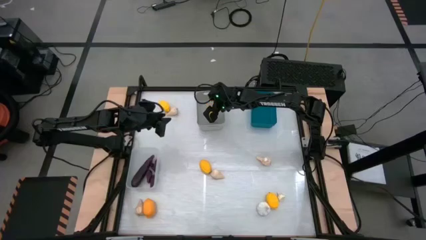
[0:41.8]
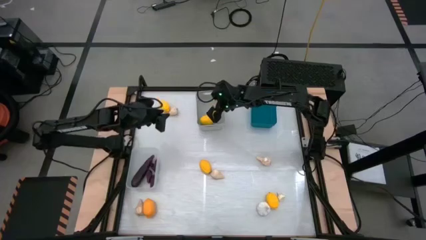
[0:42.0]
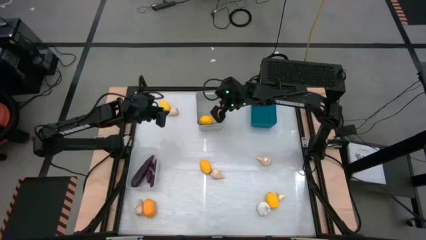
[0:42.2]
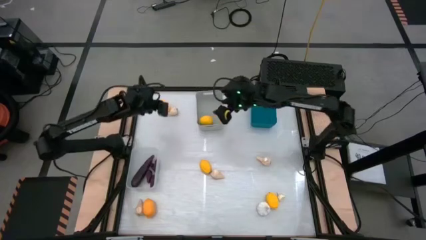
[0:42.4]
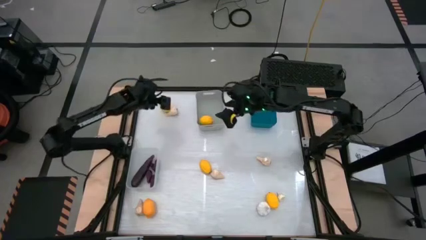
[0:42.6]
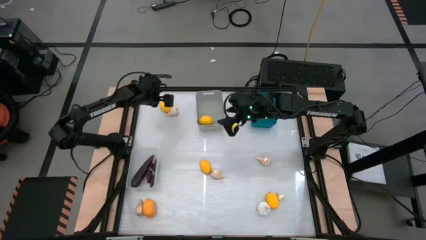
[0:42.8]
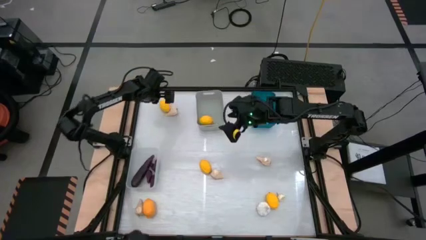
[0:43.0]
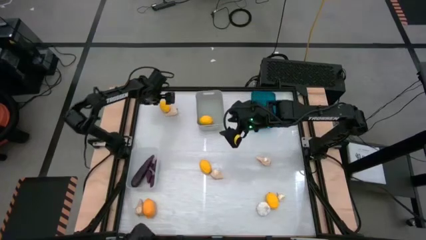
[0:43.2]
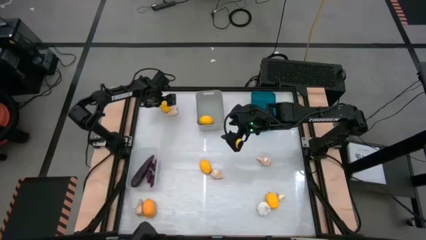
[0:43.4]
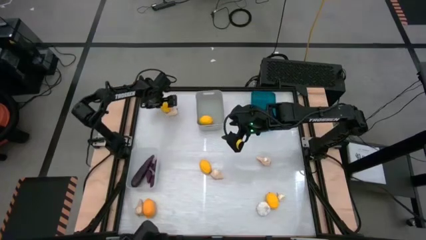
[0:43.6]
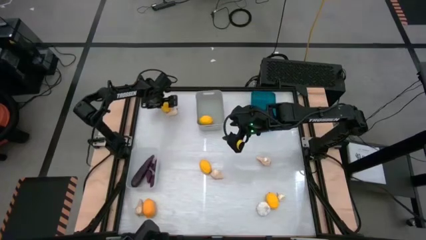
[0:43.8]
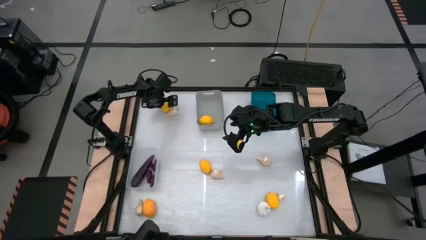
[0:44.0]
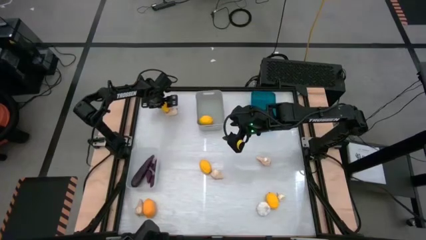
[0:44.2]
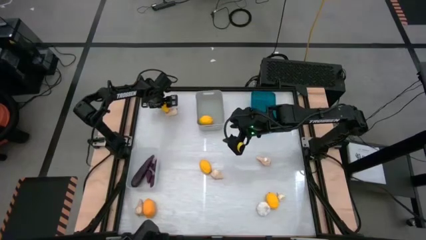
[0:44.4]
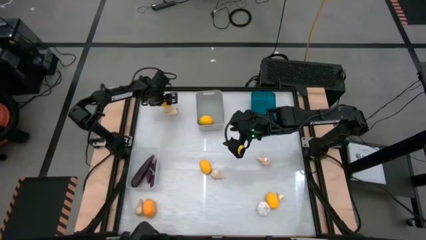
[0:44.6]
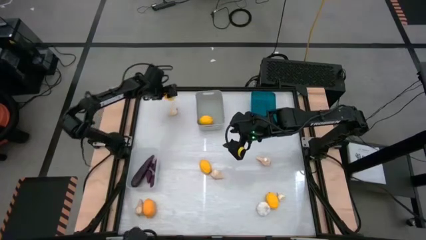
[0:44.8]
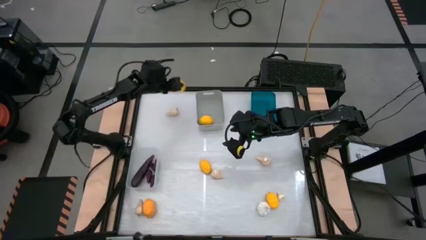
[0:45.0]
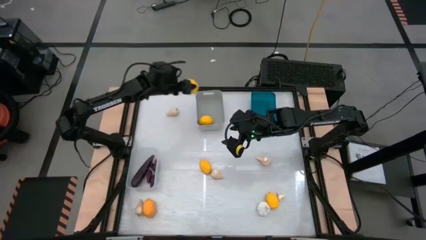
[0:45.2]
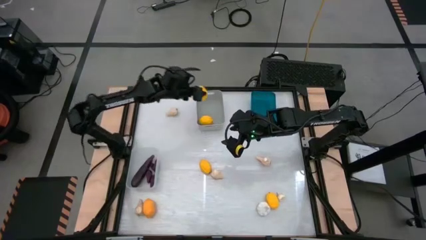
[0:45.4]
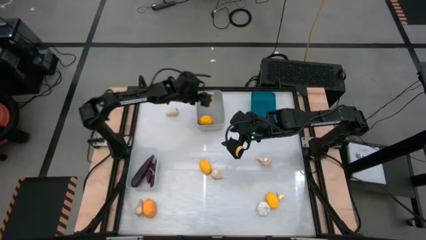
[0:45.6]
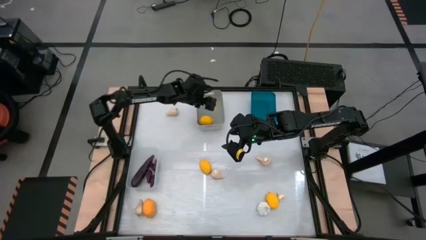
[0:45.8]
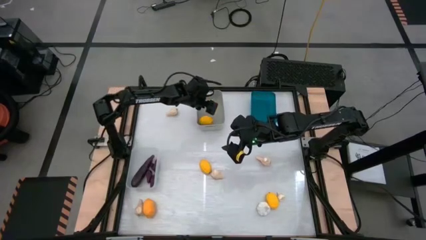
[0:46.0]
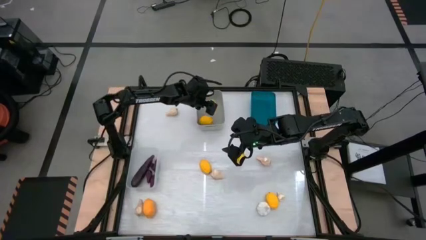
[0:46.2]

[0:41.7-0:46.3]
Task: Sort produce into baskets
Put the yellow lemon into the gray bin

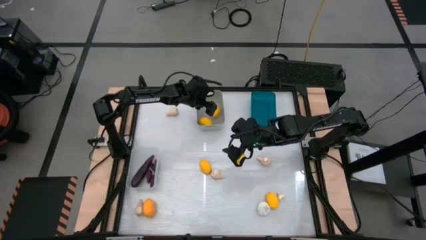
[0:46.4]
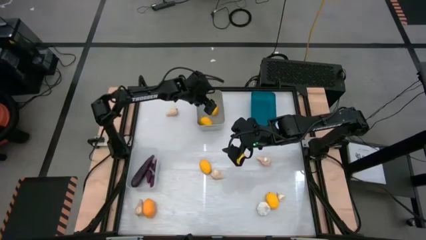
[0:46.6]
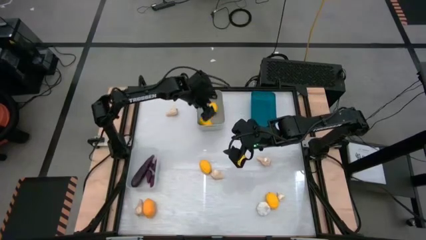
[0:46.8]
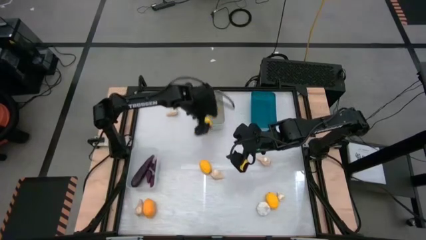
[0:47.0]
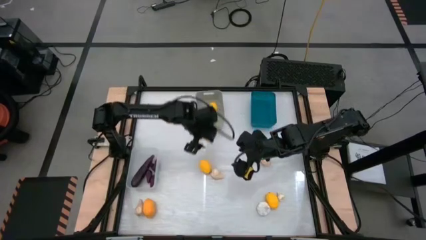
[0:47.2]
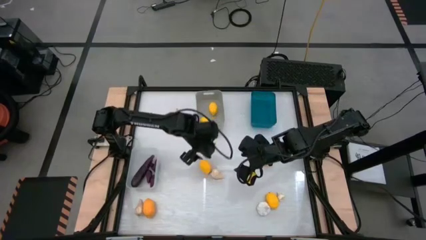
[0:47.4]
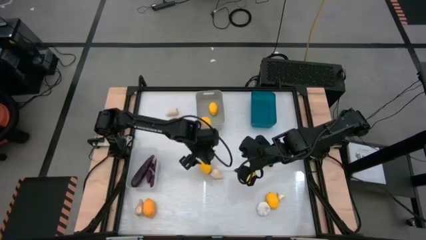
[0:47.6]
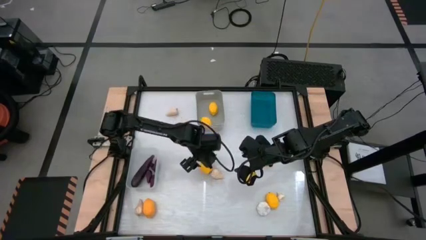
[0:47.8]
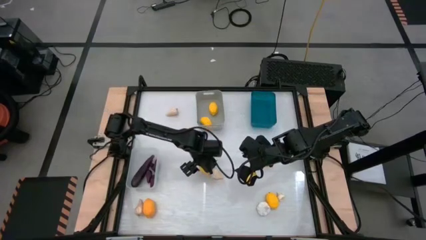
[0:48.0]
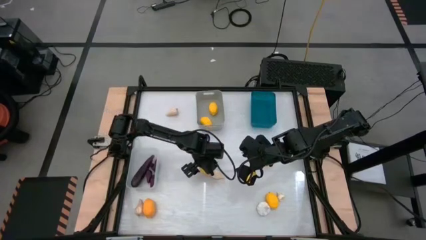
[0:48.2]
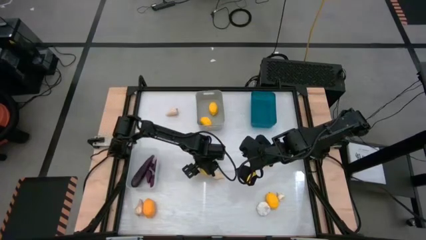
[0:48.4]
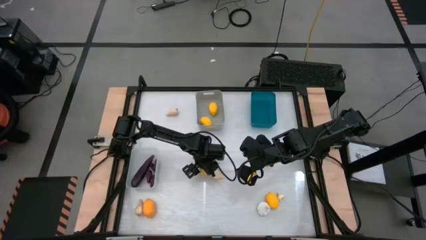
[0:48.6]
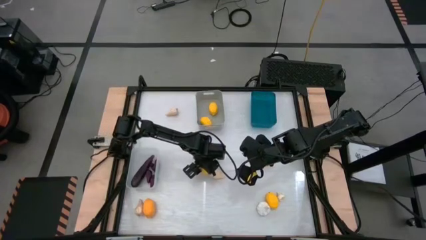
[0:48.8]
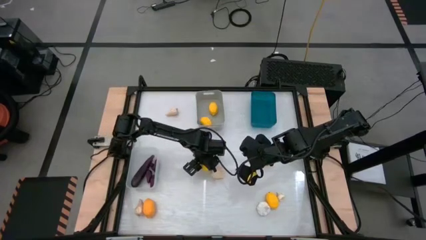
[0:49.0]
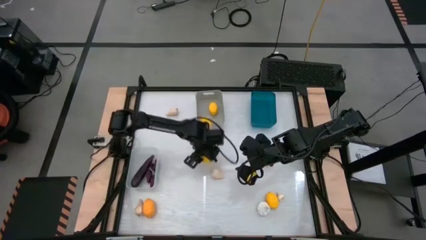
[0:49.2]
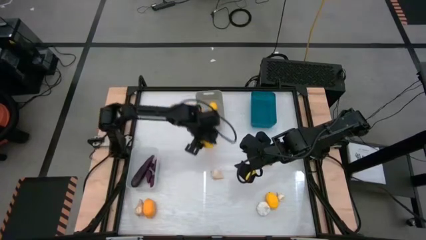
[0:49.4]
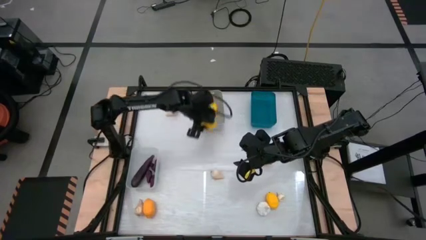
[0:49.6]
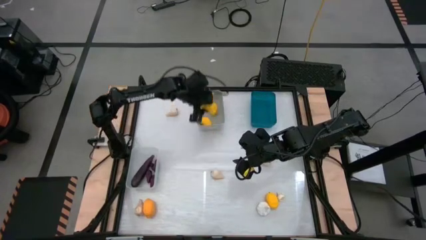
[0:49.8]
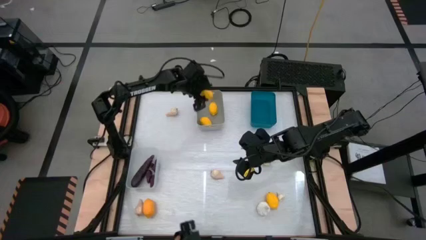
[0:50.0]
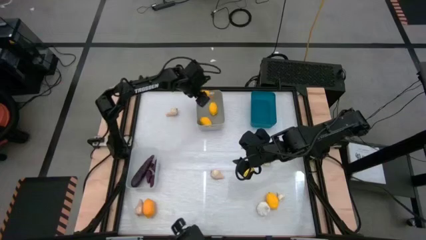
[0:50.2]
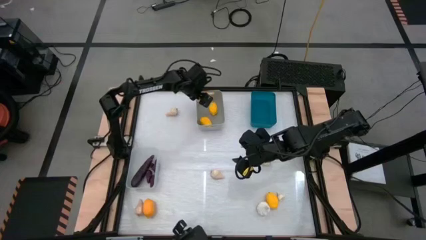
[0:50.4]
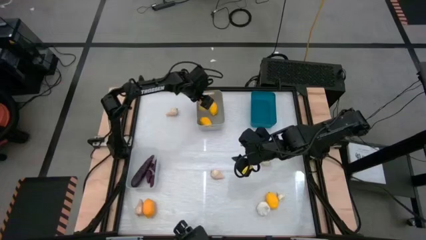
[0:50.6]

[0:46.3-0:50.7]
Put the yellow lemon into the gray bin

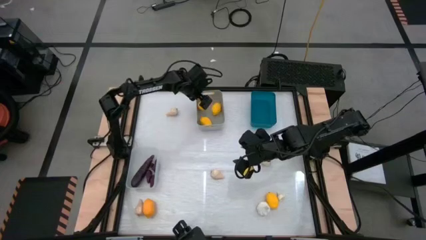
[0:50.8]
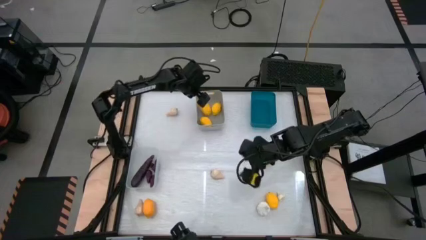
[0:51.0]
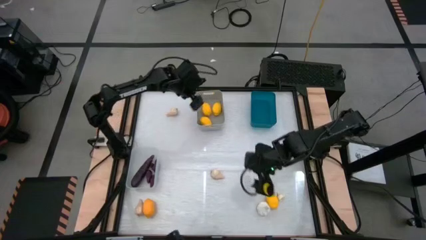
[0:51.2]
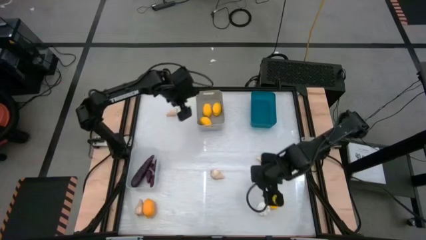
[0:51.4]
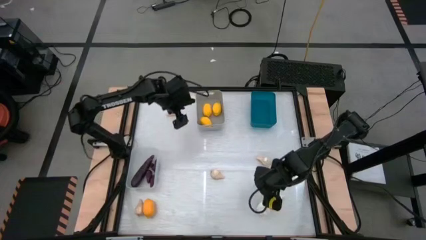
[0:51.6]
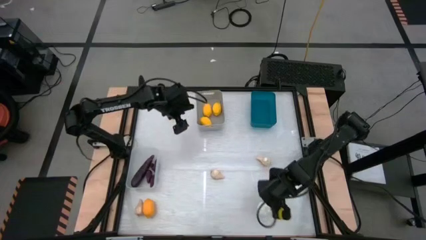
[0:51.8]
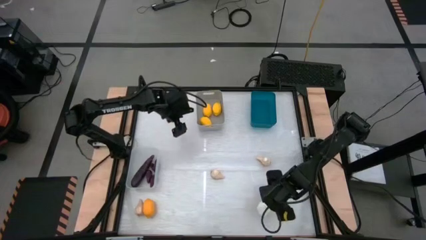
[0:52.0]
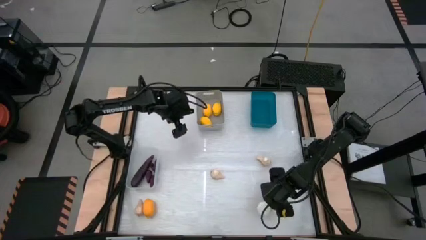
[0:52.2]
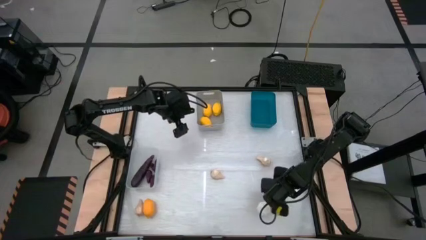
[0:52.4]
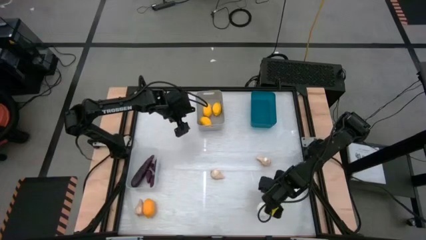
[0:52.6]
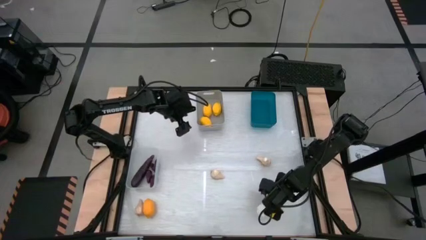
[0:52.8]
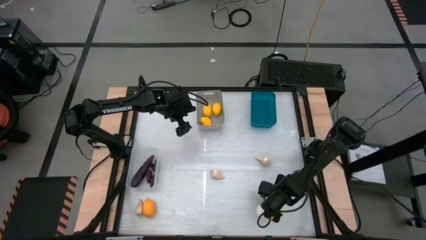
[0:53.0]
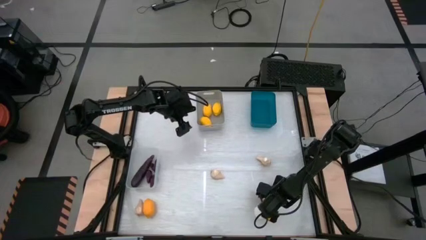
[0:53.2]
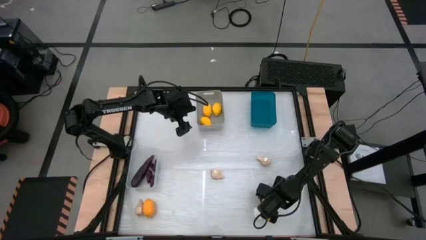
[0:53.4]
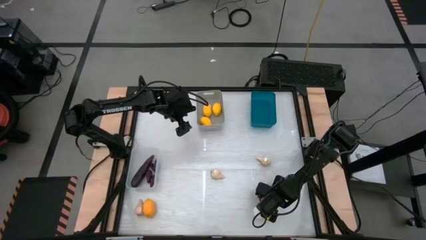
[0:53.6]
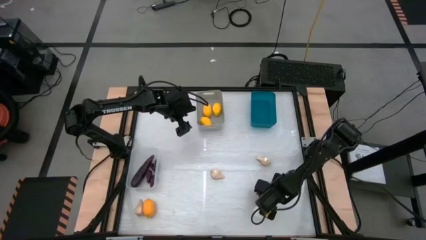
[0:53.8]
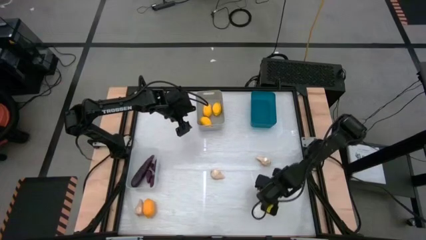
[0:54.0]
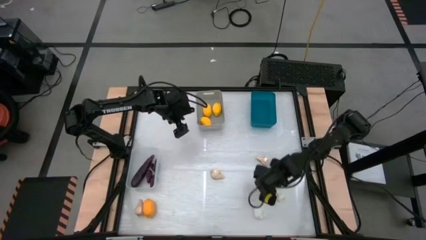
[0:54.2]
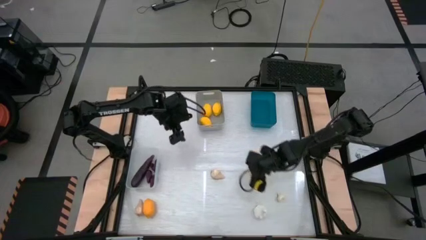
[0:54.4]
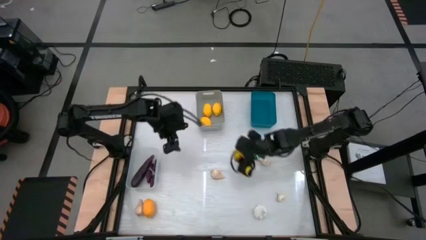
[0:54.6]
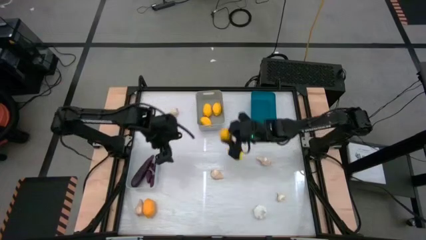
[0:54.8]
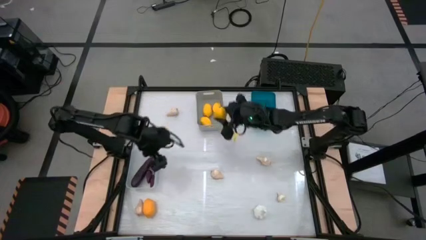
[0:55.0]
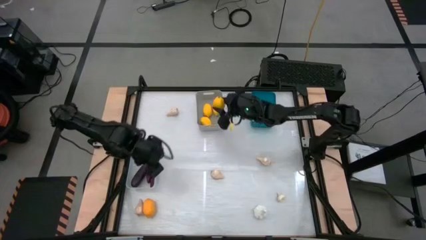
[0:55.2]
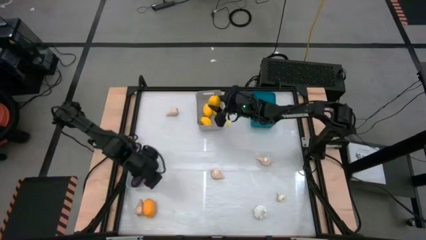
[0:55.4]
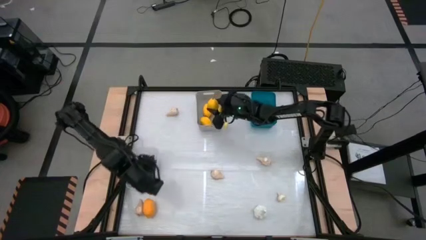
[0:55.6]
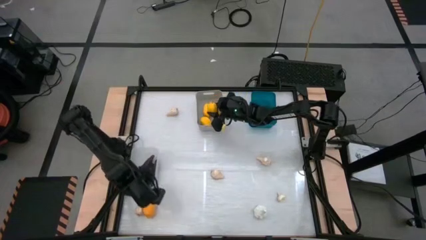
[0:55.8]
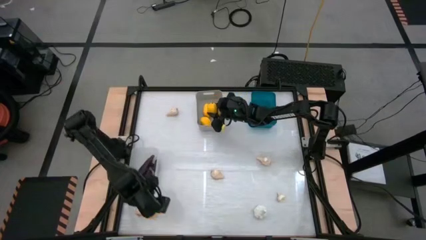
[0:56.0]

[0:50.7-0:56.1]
Put the yellow lemon into the gray bin

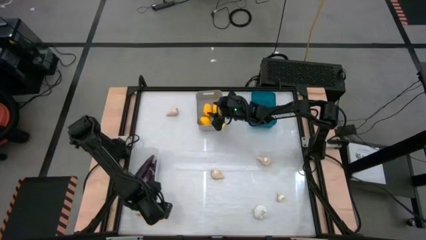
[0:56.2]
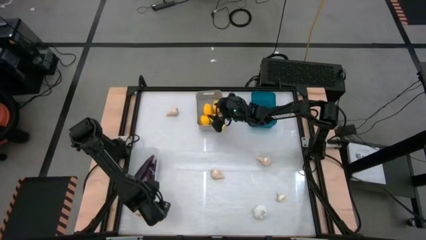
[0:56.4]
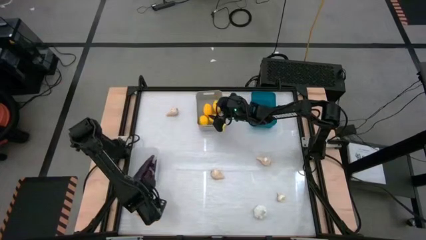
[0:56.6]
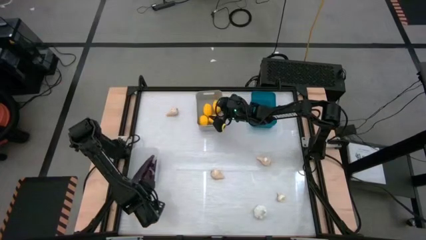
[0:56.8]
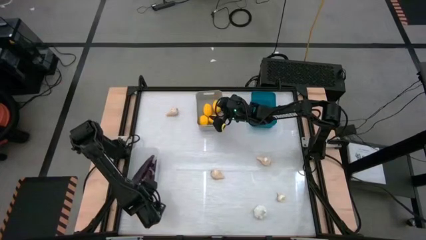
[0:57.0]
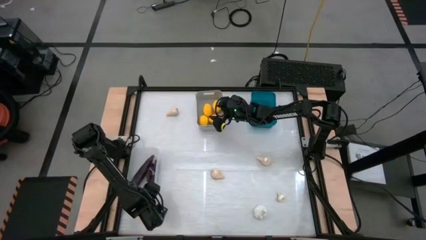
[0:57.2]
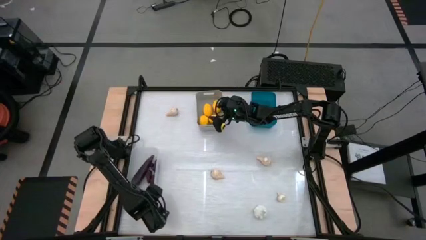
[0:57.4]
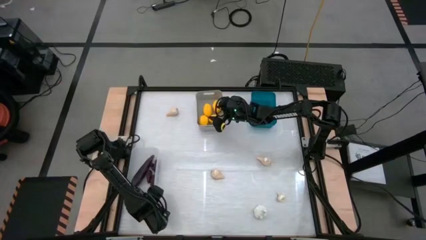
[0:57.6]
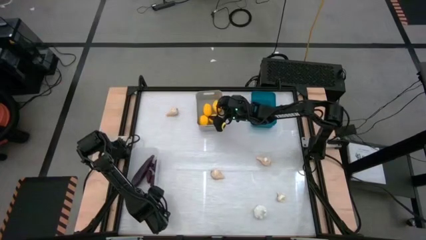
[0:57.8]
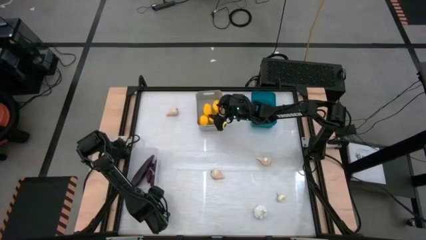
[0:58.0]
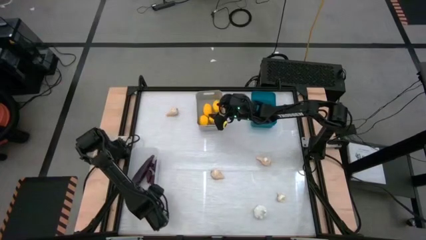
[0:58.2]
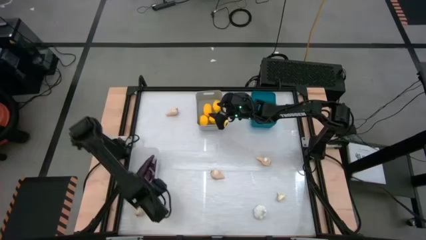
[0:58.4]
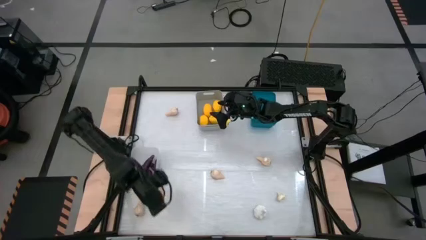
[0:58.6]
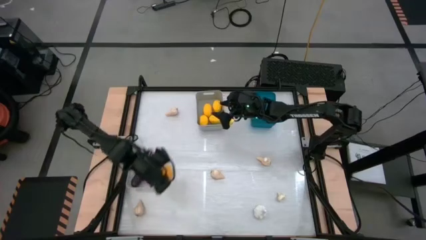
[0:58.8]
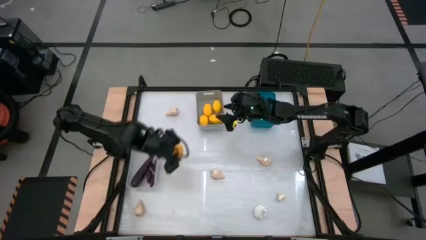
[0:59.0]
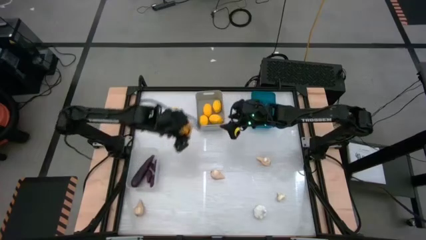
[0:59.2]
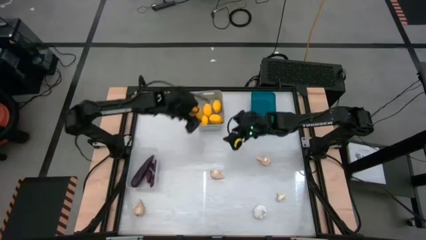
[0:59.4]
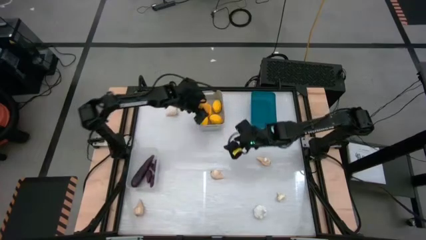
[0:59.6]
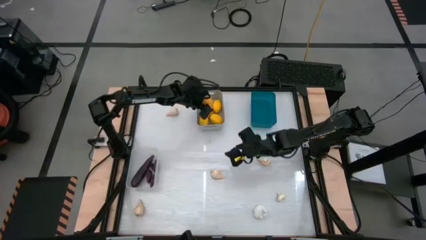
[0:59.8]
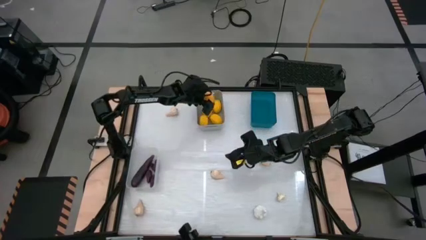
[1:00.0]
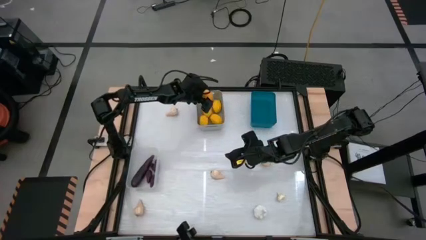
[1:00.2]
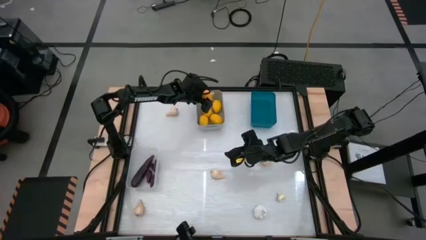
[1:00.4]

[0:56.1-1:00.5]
Put the yellow lemon into the gray bin
